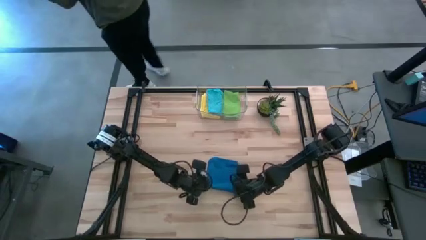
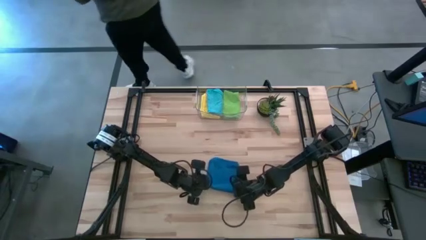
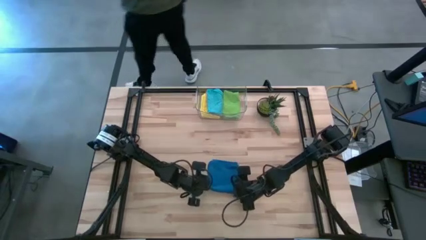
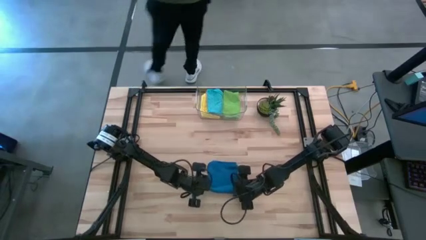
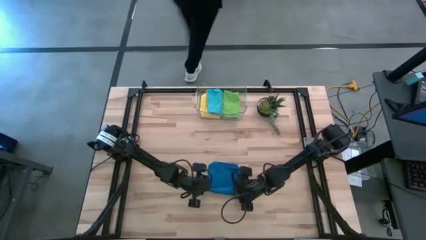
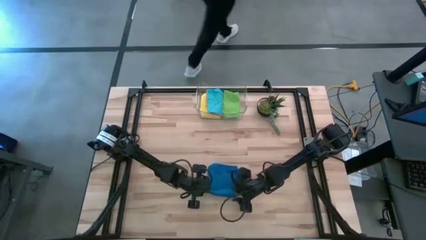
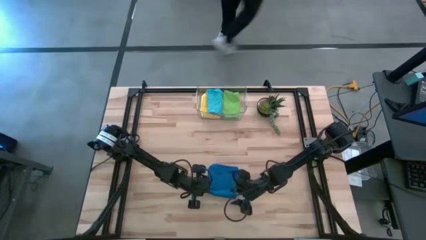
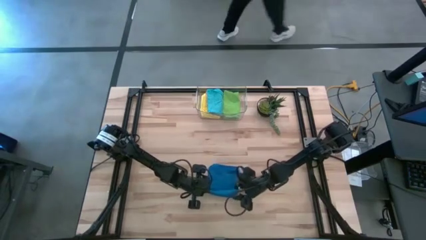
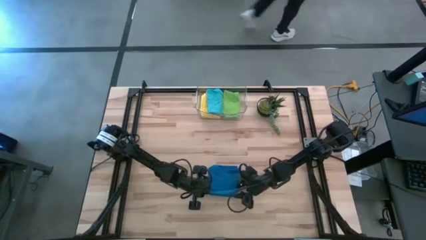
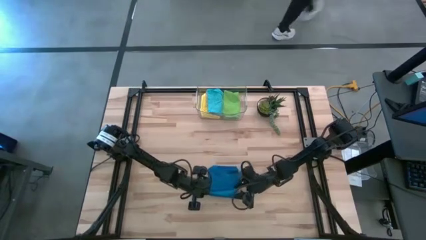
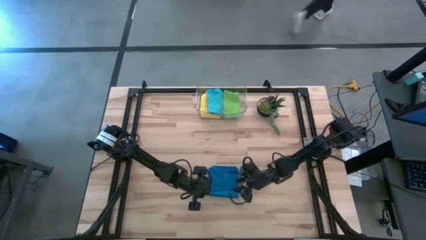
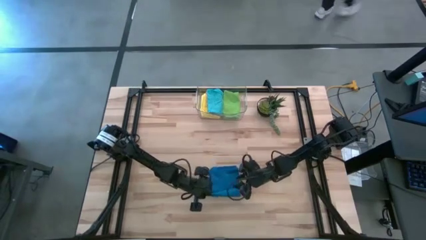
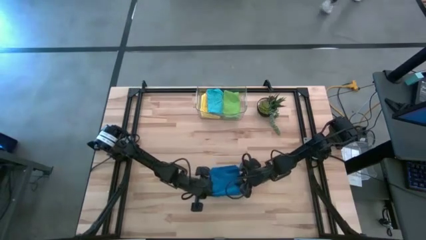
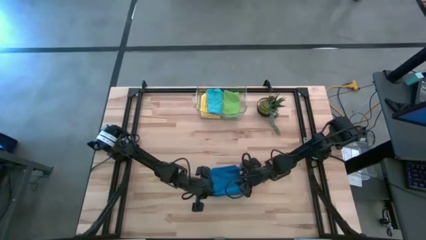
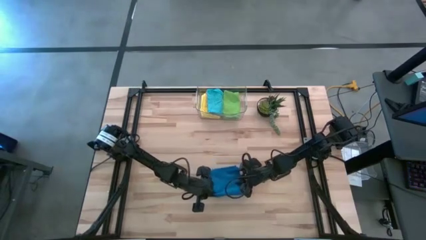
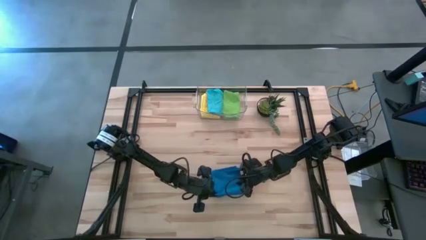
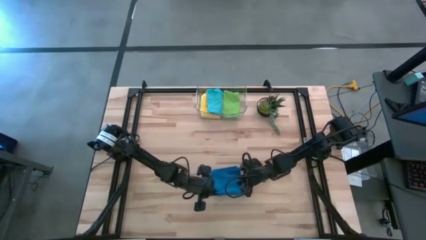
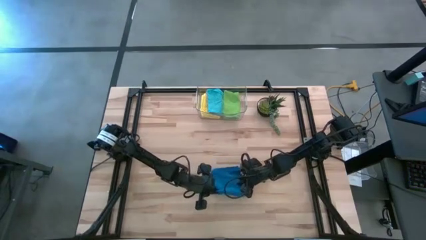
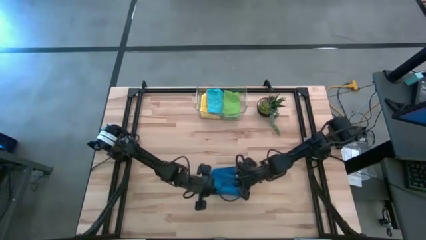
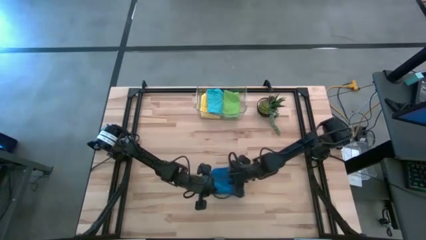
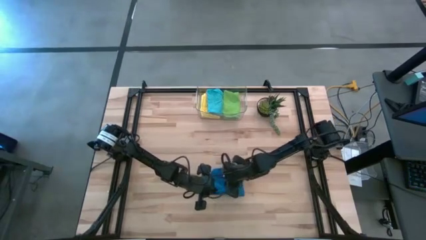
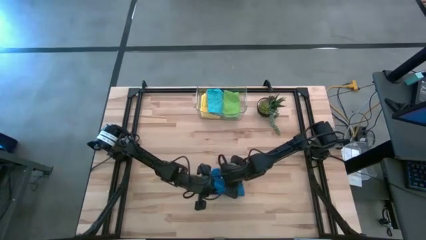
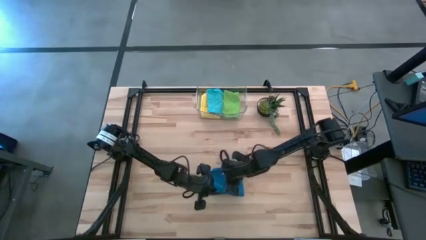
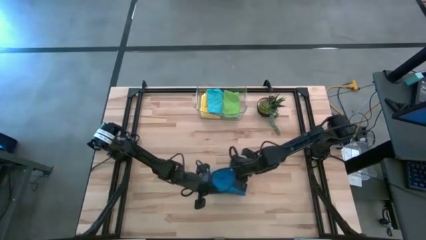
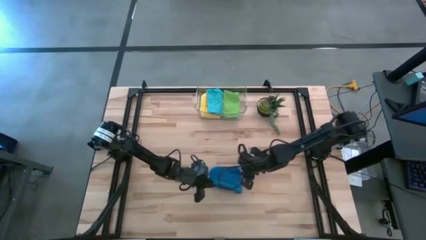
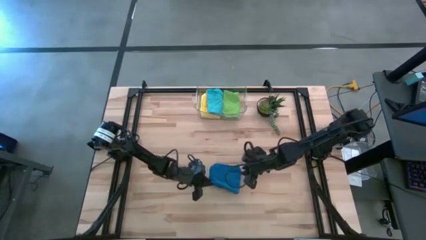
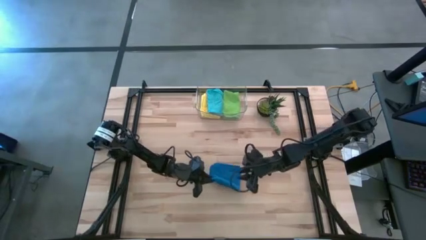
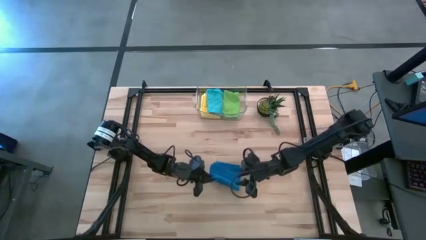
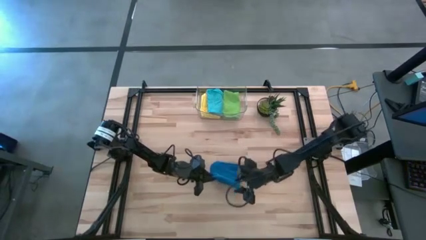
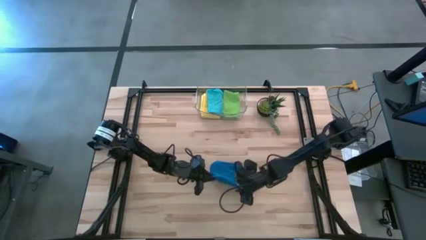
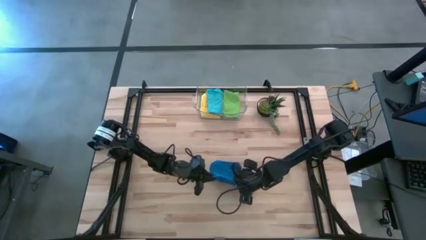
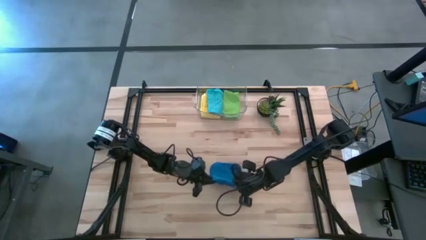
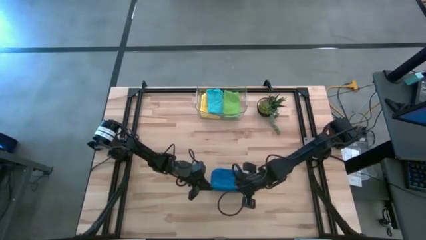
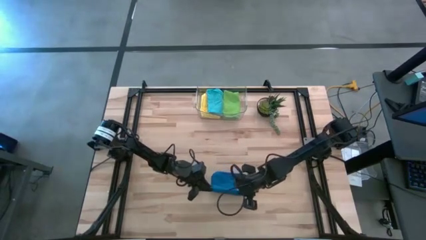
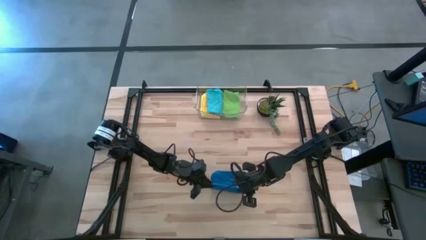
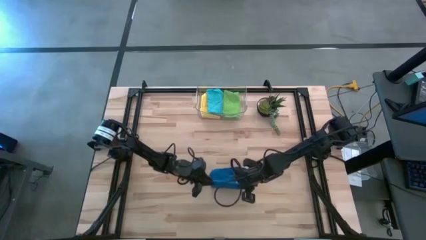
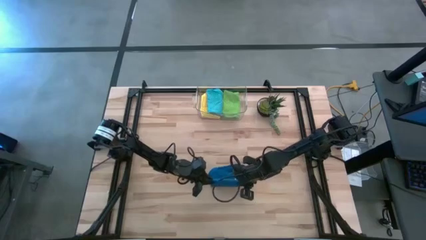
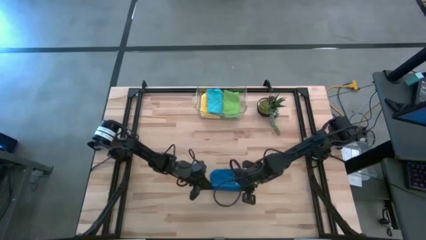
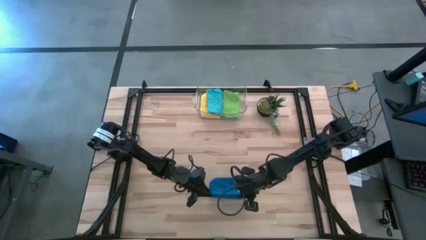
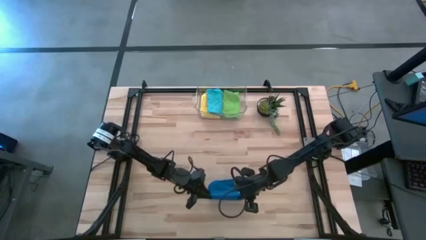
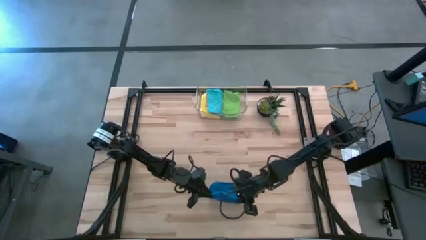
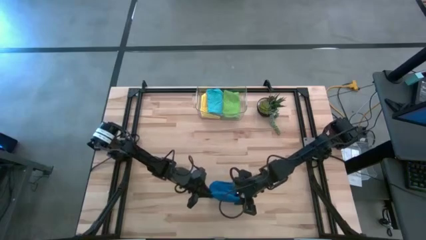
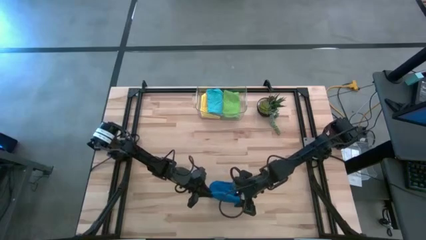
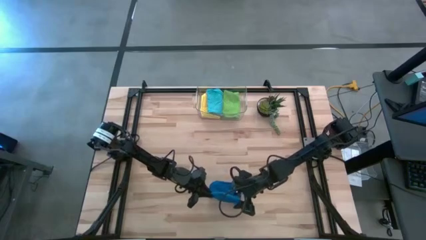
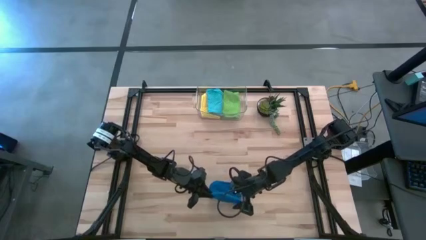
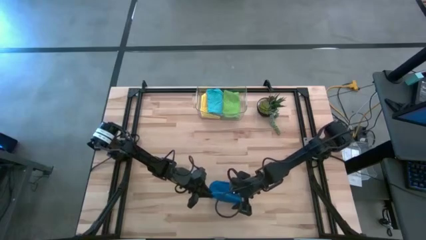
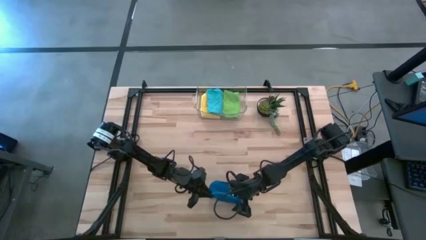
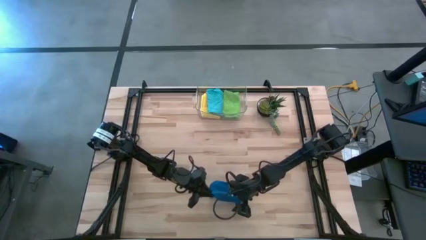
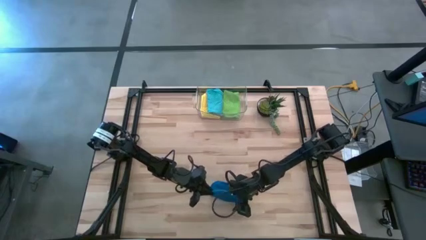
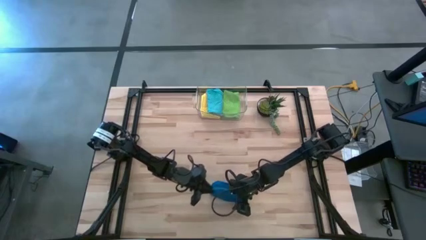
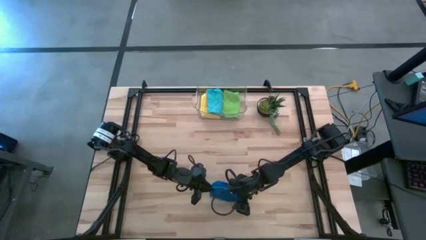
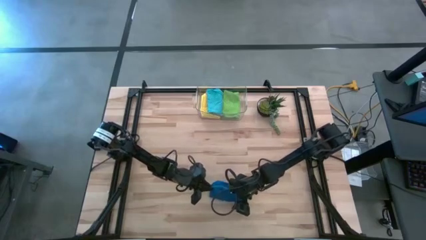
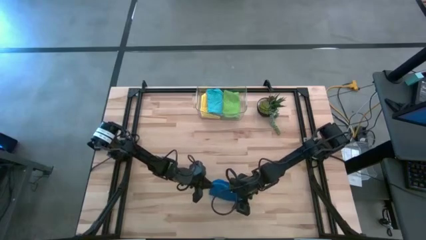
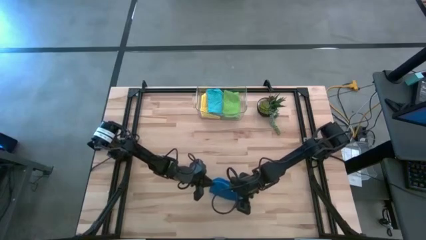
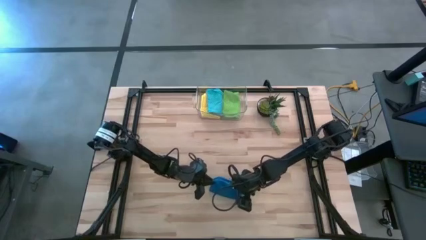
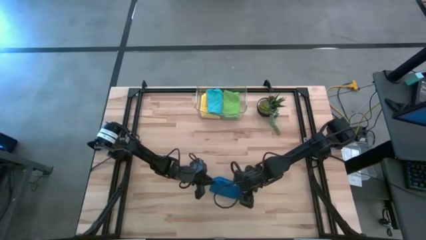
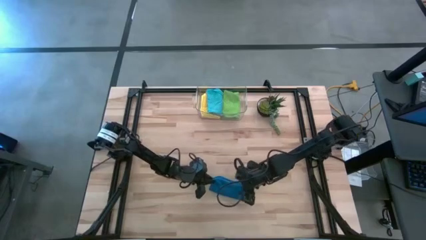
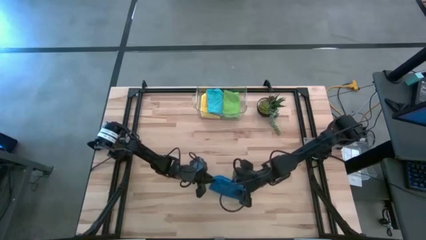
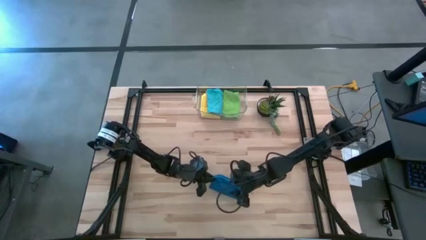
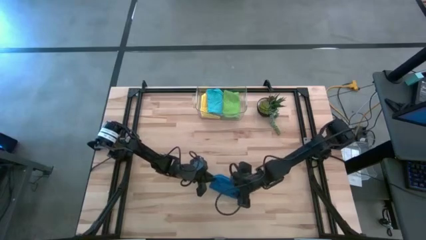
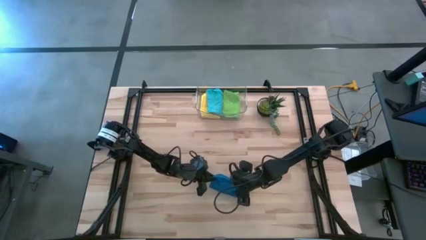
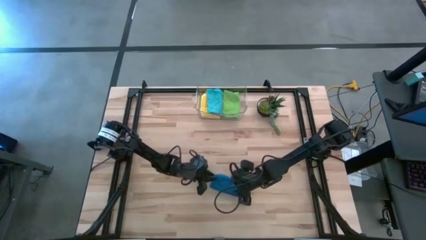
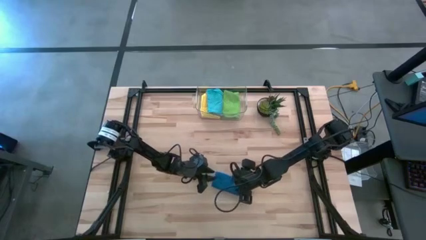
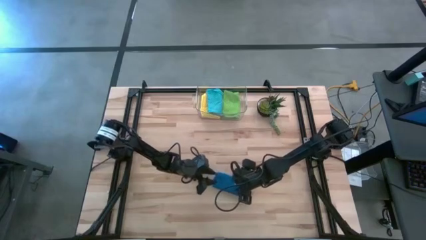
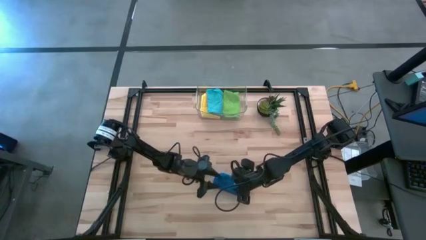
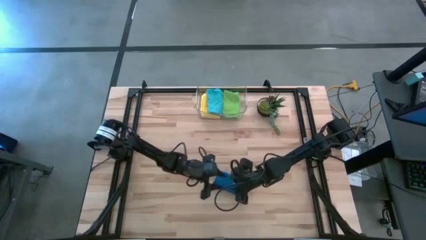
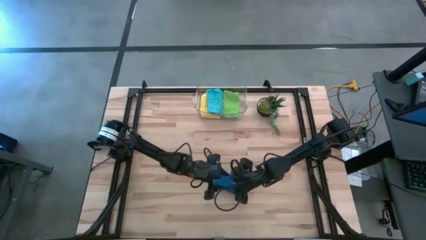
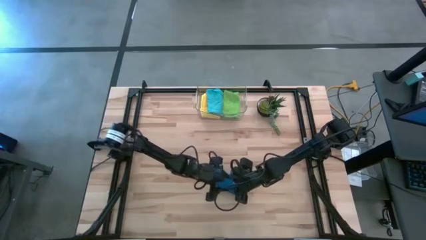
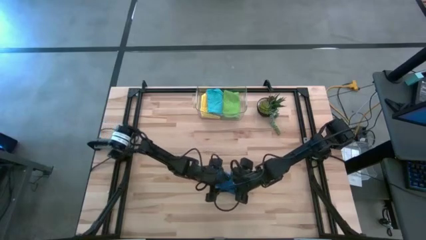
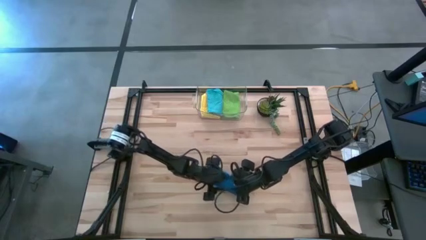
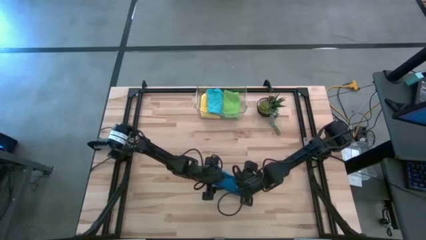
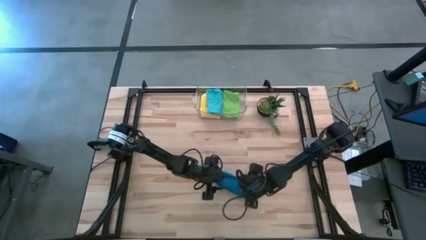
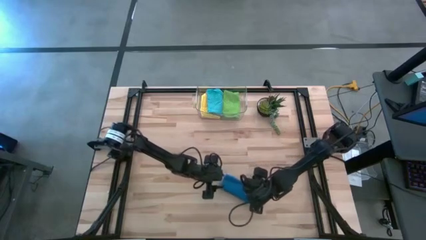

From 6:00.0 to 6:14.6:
Task: Fold microfiber towels
Fold the dark blue microfiber towel

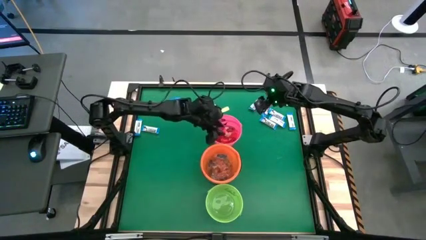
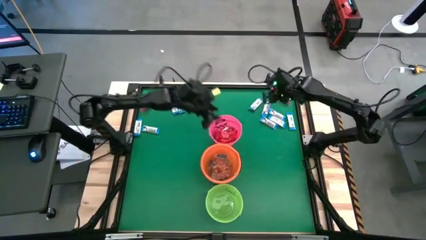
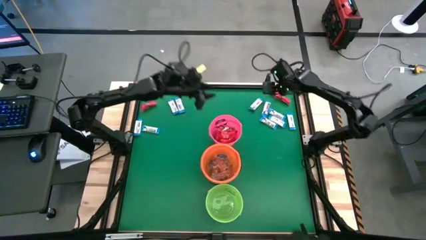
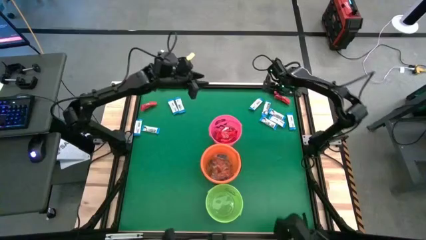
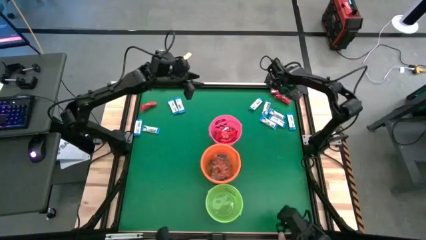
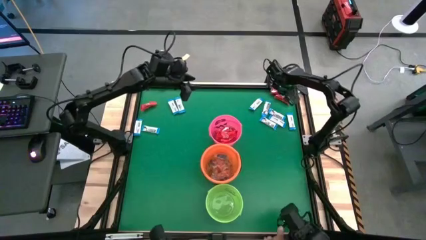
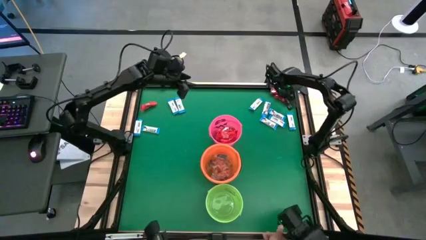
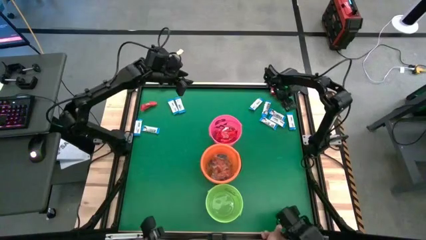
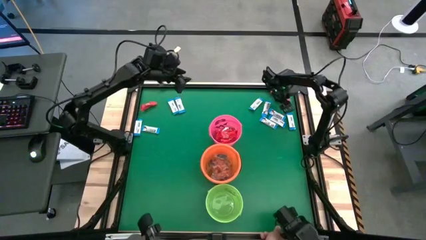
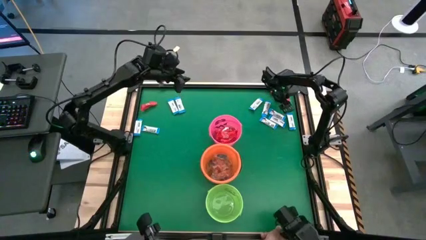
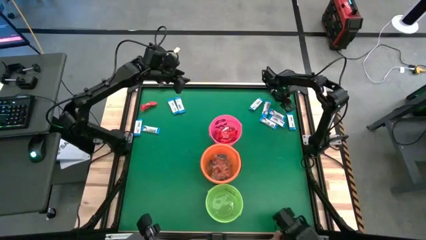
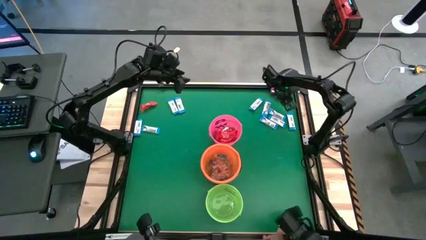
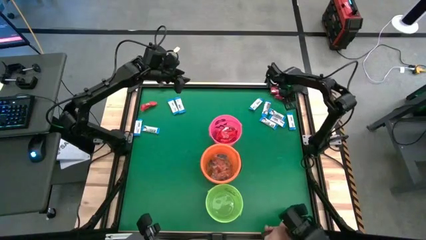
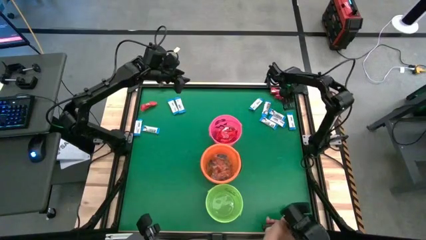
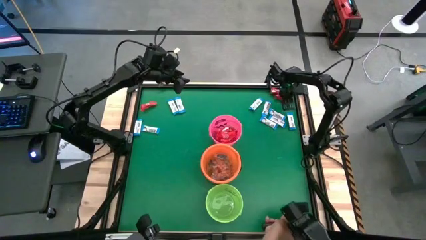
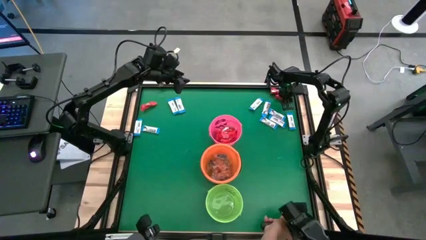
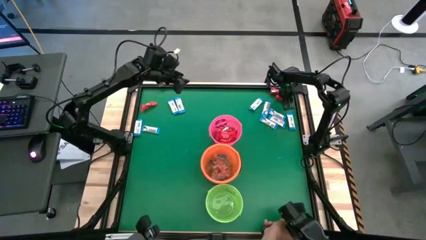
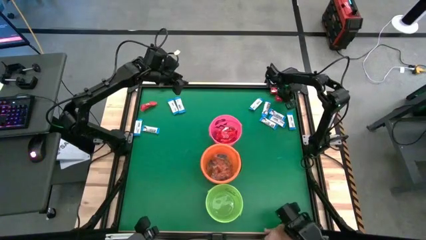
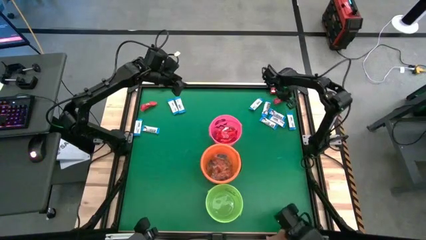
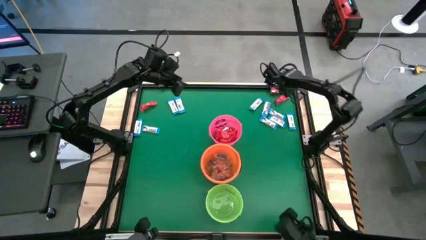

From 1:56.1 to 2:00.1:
Task: Sort candy by brand, put in halloween buckets
Put the red chocolate into the pink bucket
